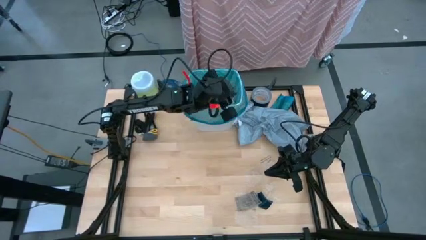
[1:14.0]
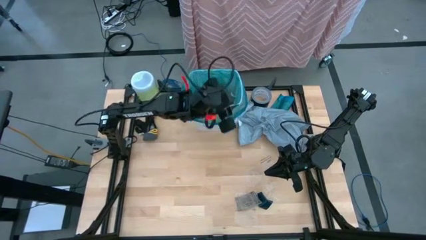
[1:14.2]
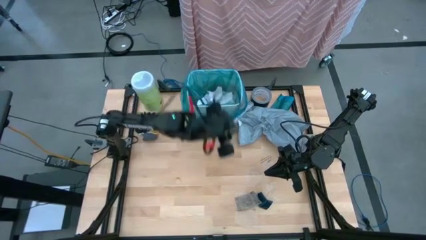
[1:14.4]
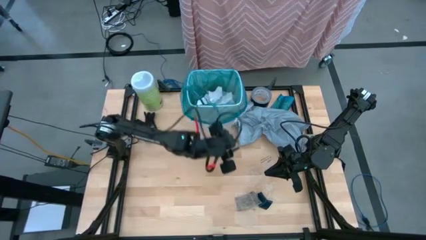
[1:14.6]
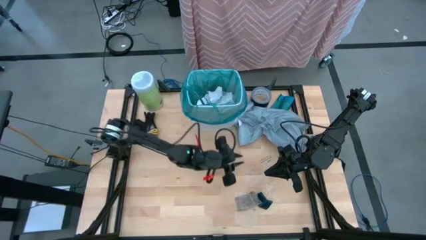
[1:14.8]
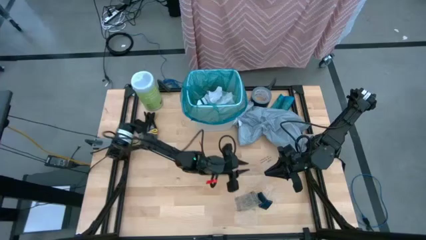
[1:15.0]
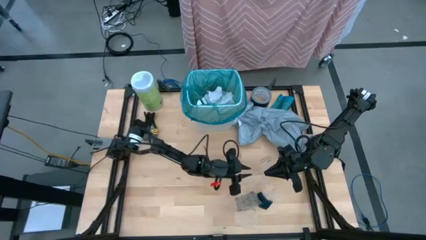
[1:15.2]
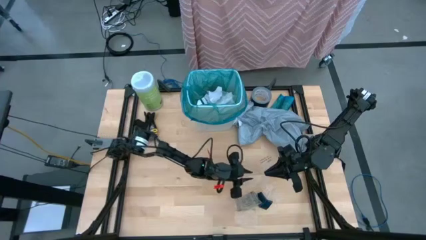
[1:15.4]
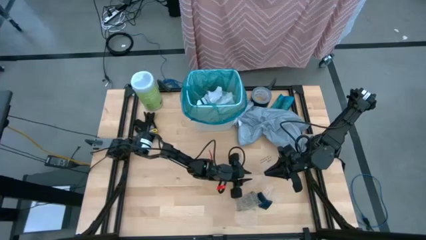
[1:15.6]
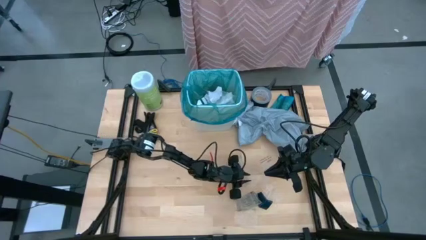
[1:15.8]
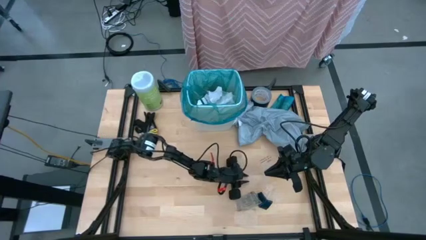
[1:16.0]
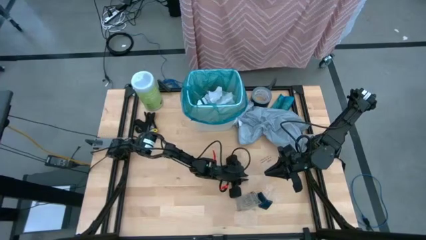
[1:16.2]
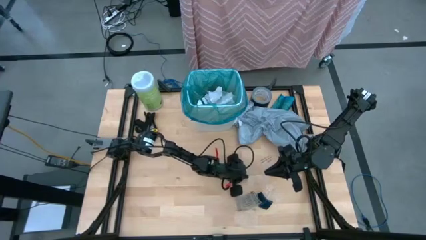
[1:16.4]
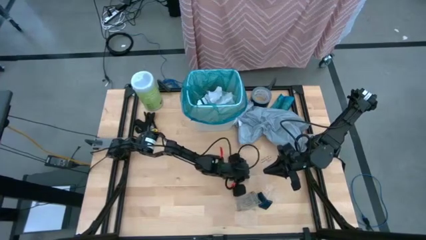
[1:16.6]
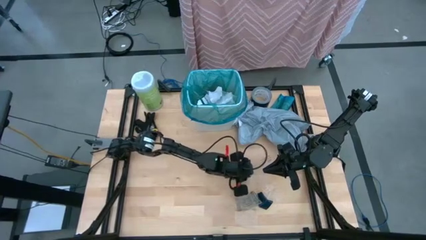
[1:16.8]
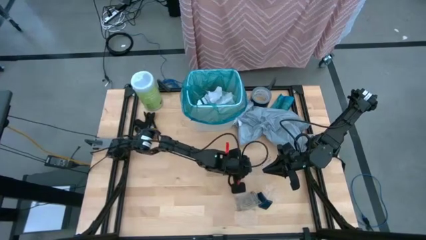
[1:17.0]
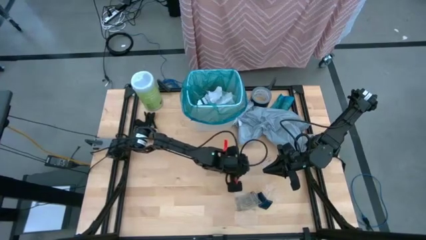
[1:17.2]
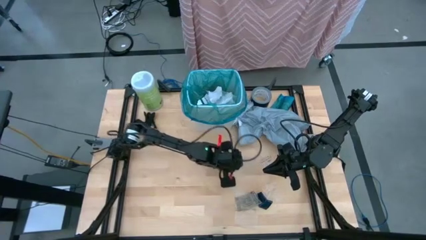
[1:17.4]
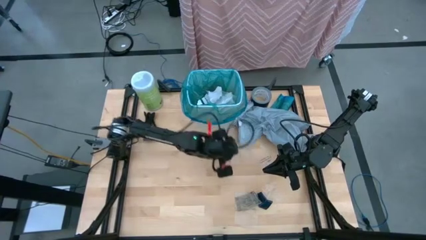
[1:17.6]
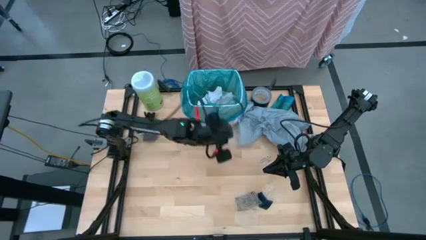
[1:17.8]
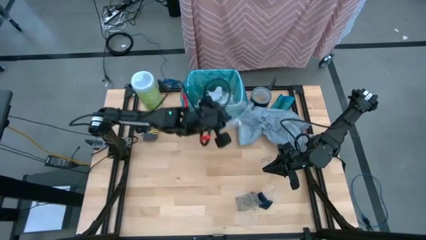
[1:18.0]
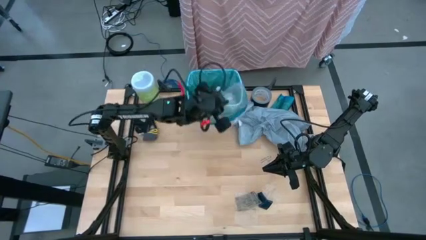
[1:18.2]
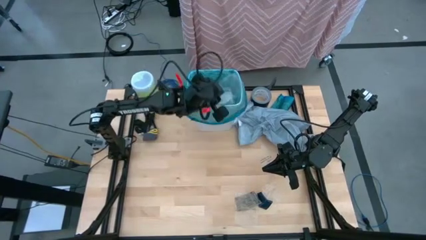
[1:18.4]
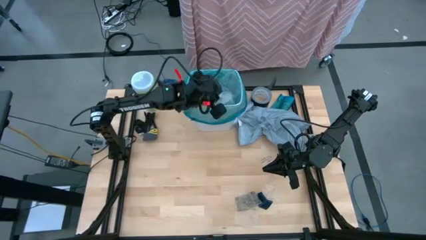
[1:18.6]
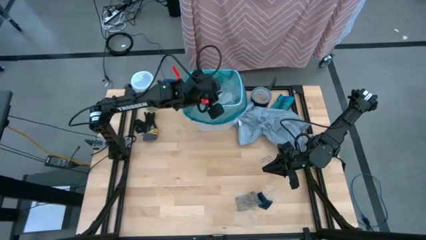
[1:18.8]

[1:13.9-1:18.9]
Task: place trash/remove bag and relplace
Put the transparent plastic material into the trash bin

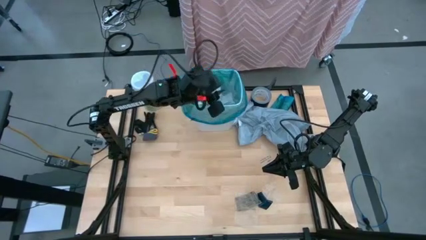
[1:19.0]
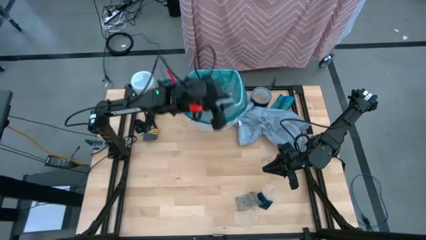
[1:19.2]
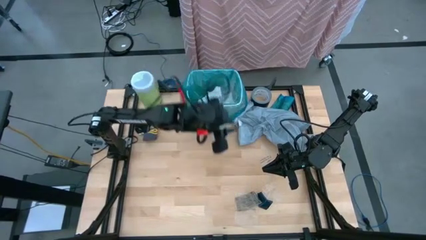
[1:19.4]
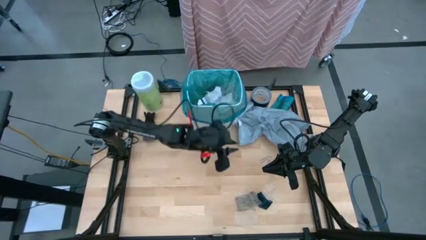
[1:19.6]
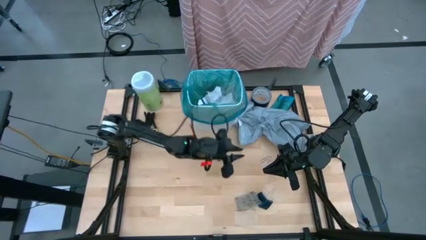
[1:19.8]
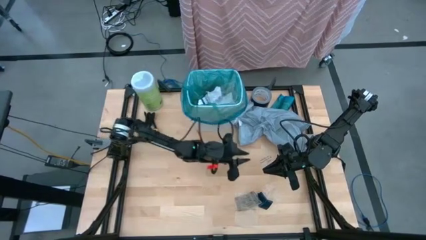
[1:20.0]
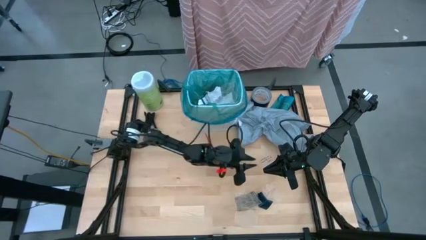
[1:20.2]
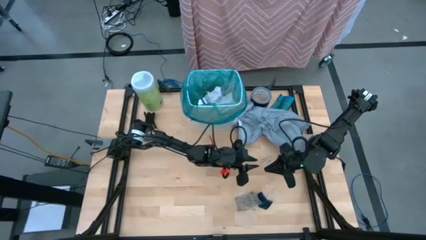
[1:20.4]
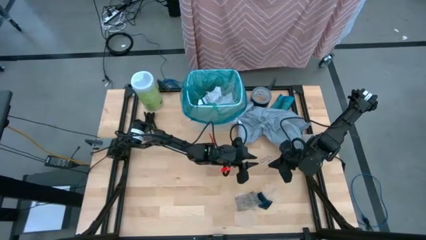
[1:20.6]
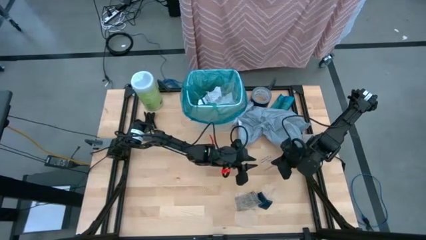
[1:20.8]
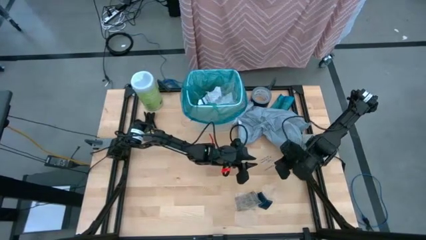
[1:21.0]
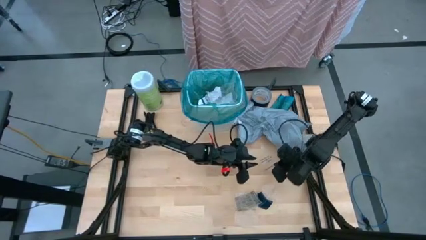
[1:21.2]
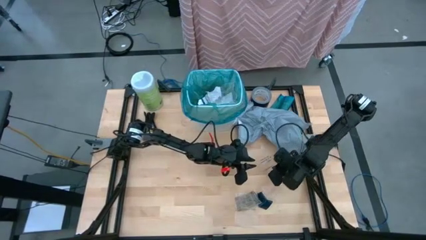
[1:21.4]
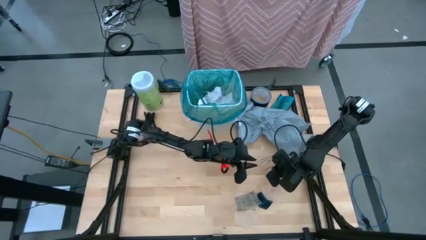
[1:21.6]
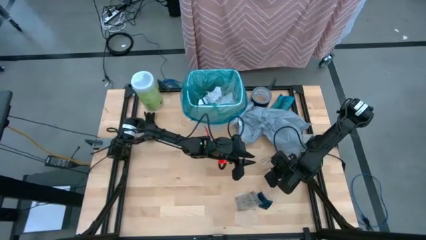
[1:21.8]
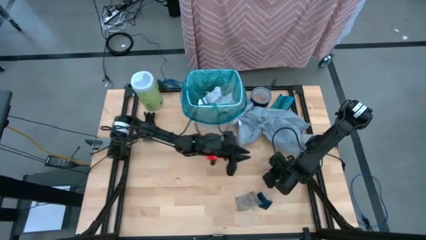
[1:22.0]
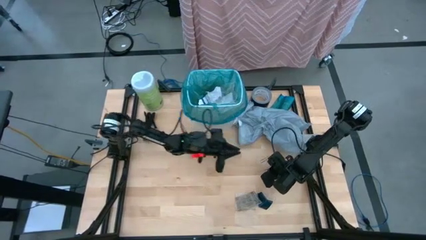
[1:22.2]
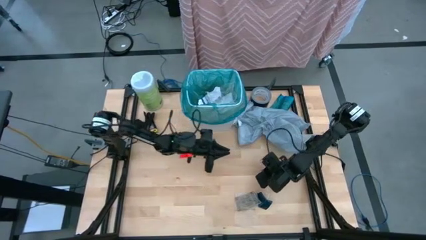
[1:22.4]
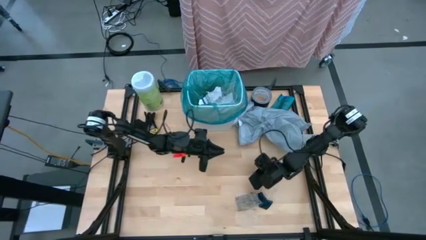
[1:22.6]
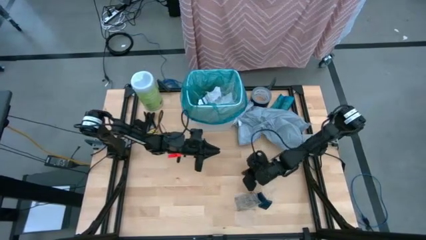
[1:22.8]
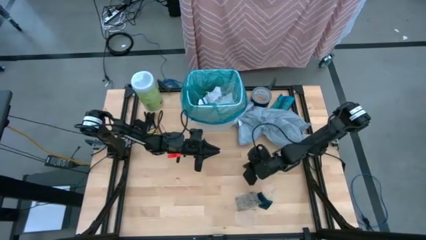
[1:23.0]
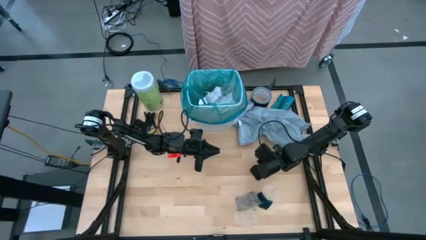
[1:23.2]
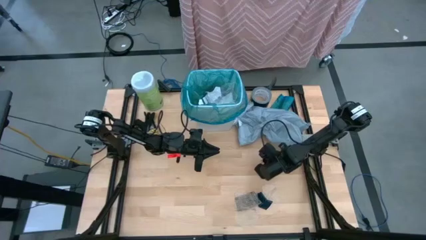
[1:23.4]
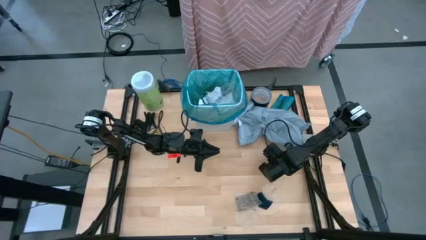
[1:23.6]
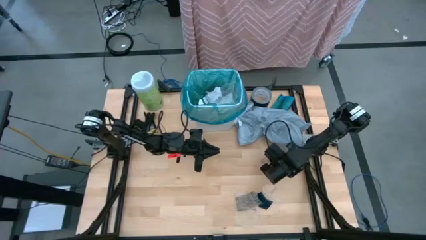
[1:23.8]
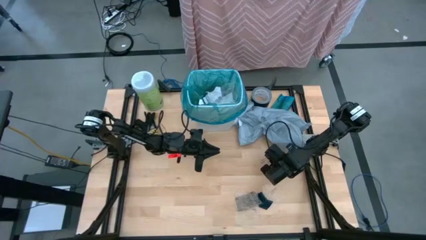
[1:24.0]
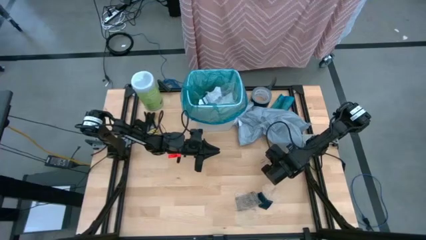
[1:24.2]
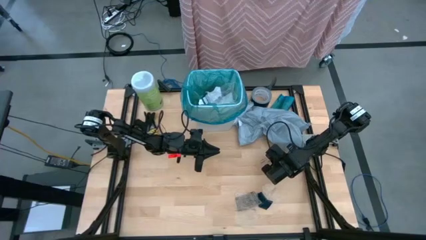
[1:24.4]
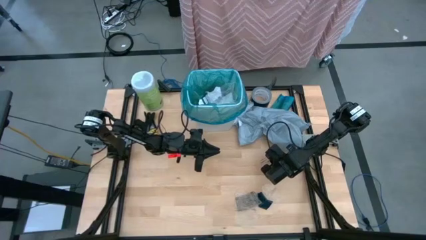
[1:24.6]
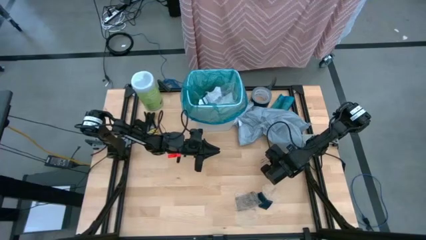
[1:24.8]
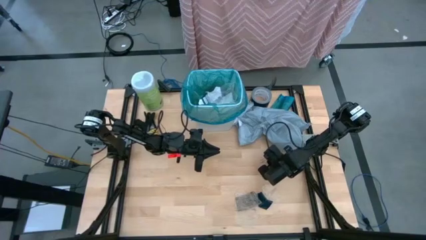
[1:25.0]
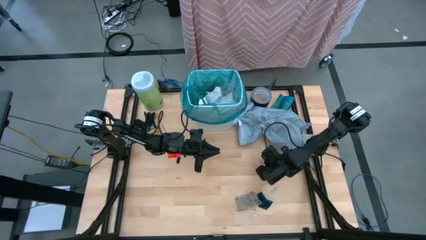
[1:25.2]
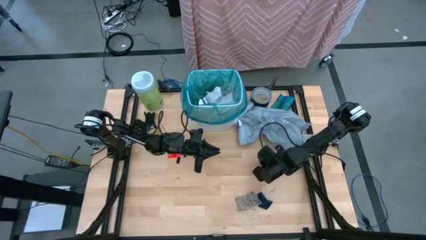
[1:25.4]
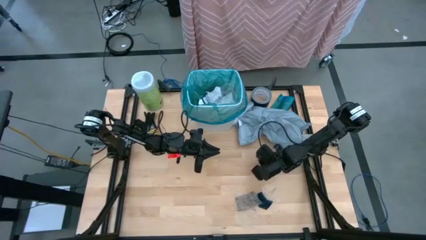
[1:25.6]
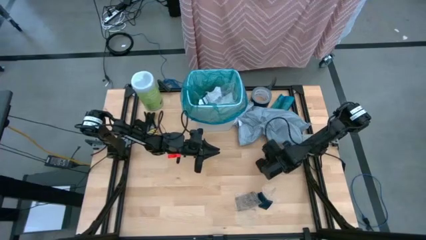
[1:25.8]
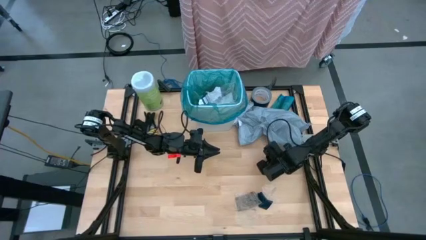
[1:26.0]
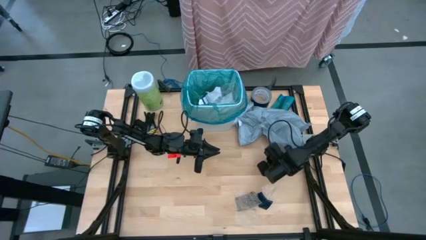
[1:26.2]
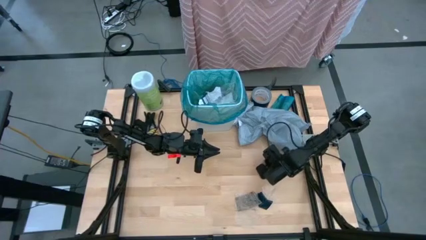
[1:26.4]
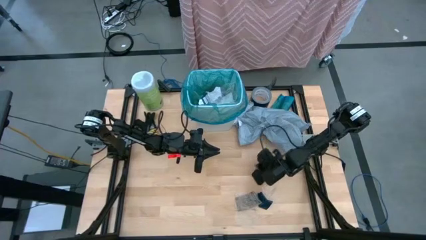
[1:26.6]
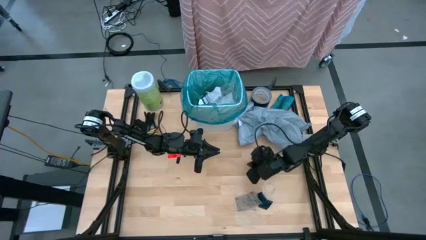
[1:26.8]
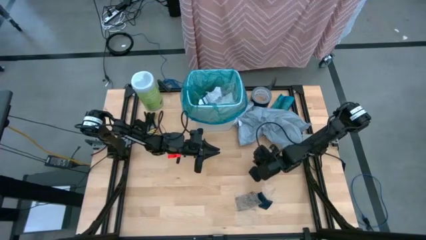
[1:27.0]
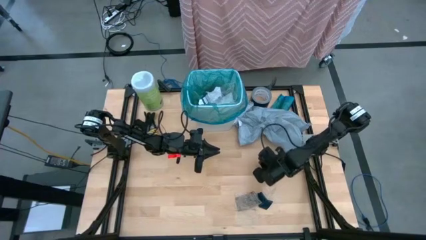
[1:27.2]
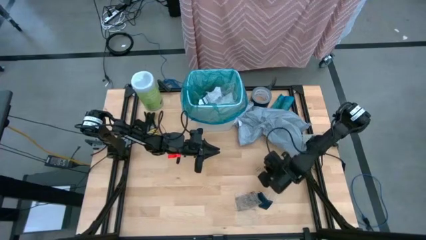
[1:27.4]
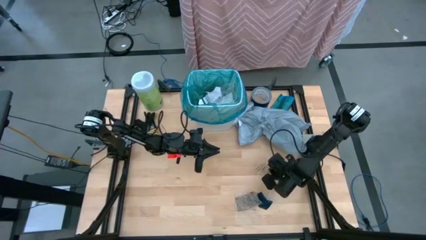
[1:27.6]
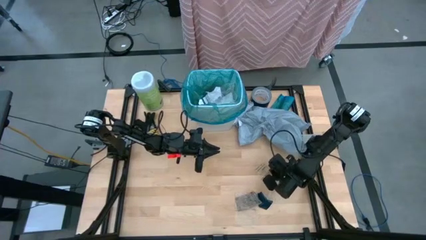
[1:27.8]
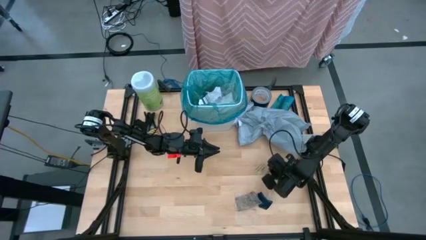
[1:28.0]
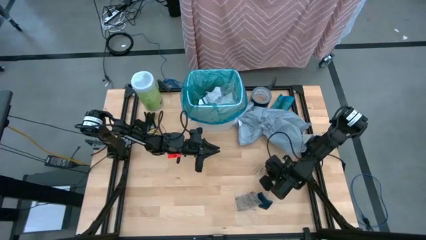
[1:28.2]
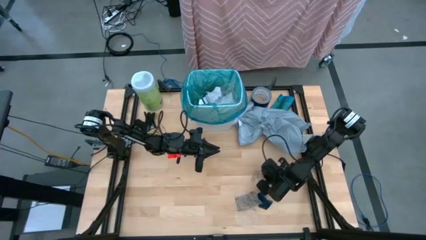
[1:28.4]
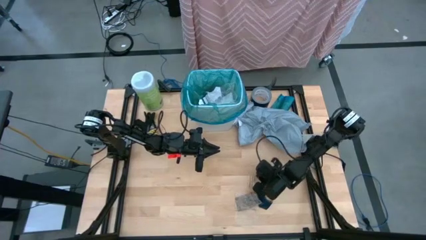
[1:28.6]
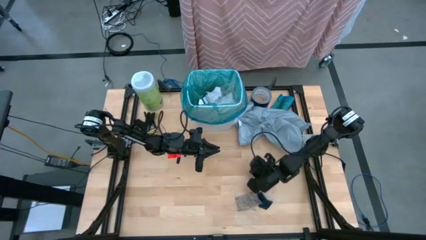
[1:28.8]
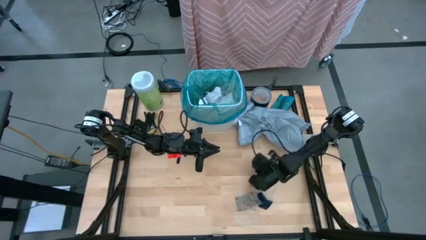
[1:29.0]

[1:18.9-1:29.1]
Put the transparent plastic material into the trash bin

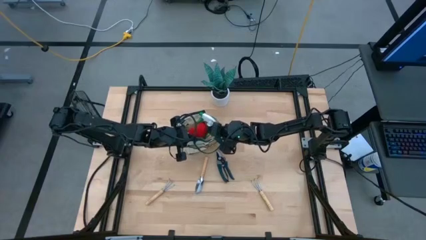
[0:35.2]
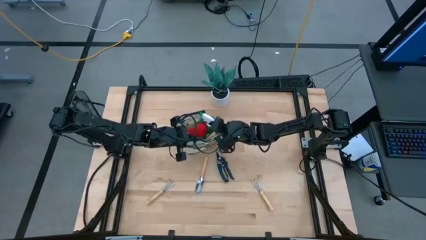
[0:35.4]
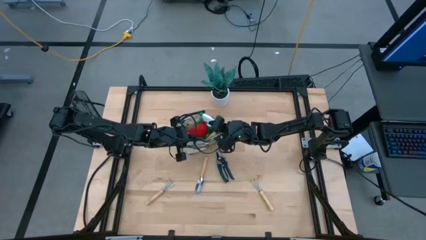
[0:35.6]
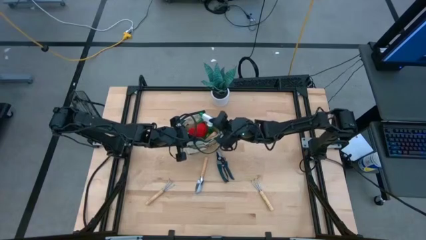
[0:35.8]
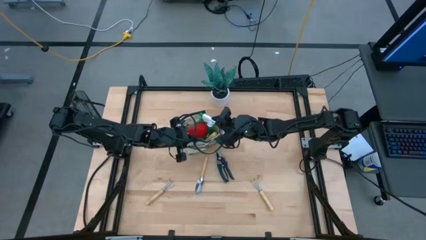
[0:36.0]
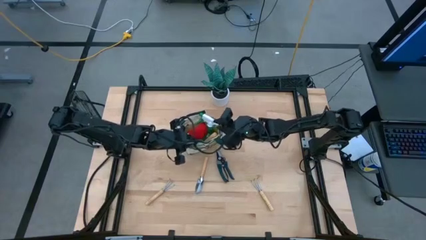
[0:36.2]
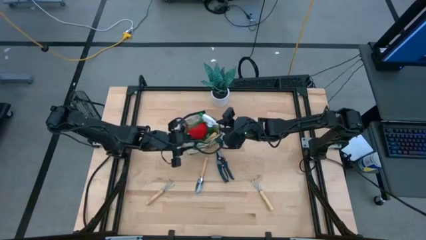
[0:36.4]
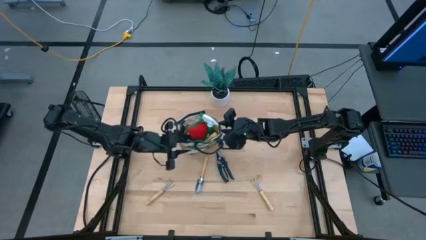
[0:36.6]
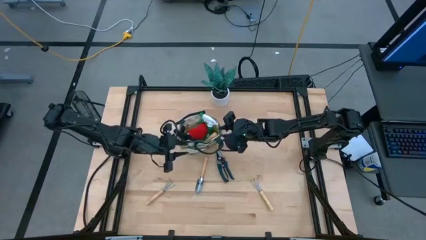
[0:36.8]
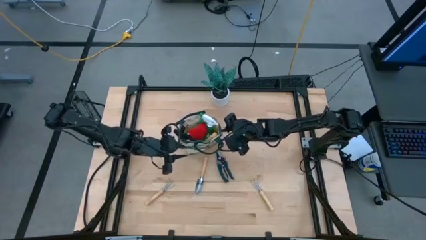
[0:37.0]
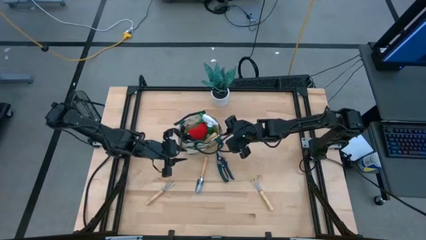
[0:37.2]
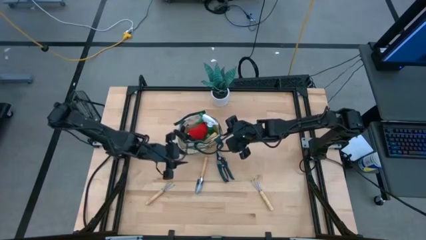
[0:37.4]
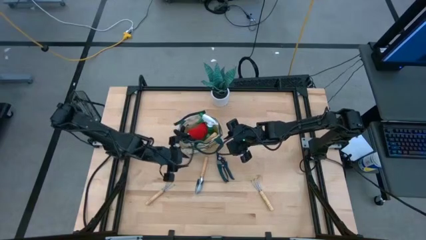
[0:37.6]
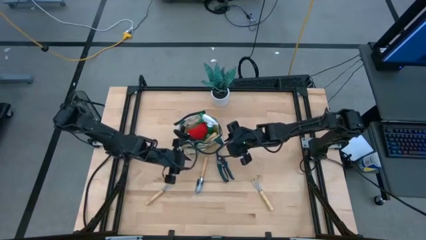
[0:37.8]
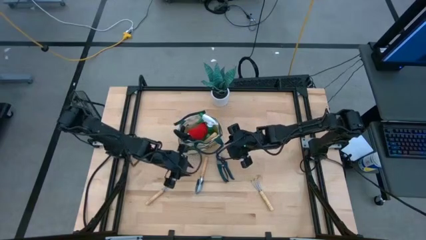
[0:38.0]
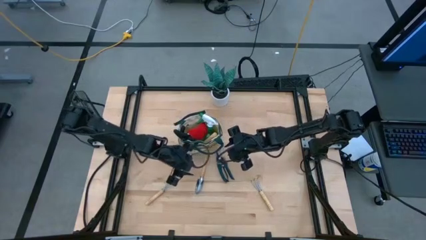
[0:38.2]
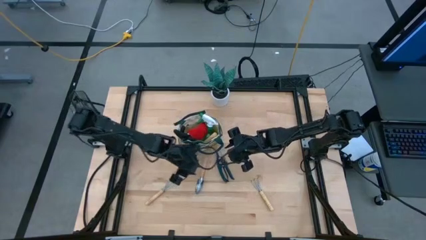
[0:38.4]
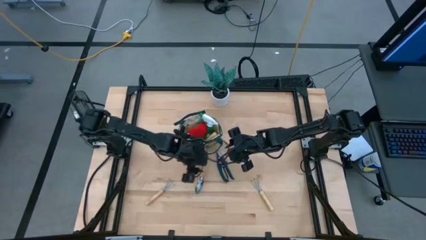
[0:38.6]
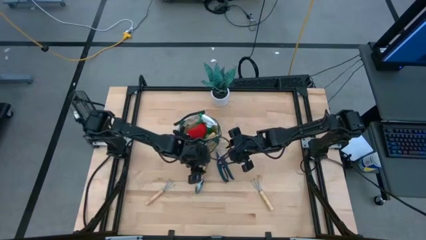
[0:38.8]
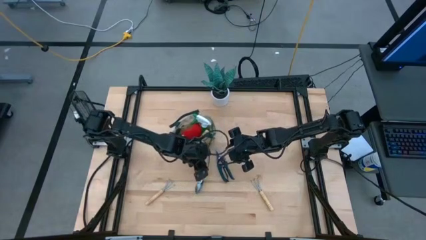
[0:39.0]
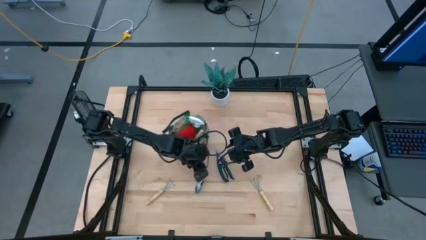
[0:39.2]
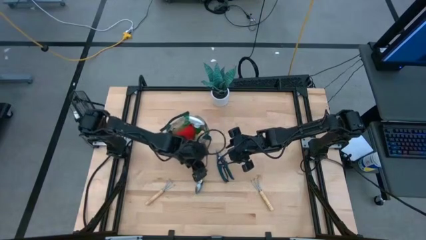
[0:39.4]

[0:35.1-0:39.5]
Task: Pick & Place Garden tools in Gardening bag
Adjust the brown gardening bag
